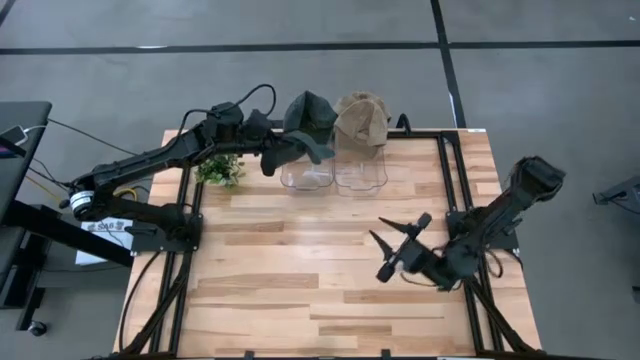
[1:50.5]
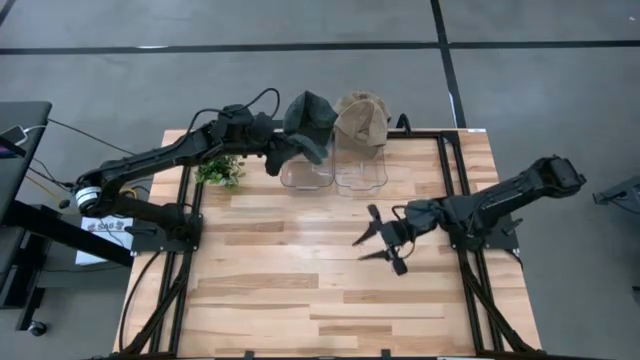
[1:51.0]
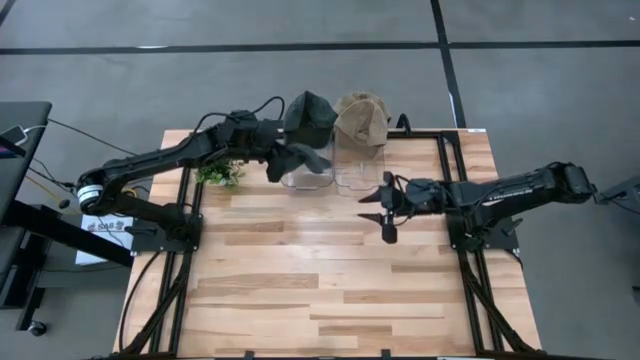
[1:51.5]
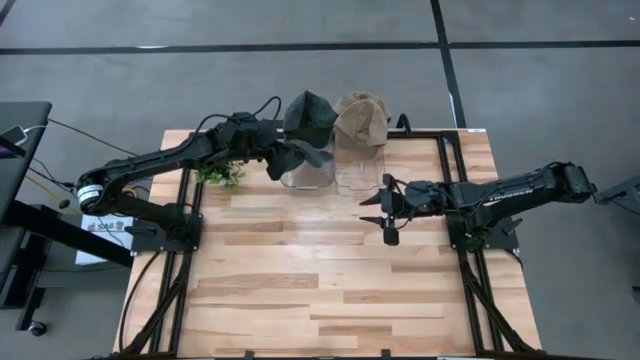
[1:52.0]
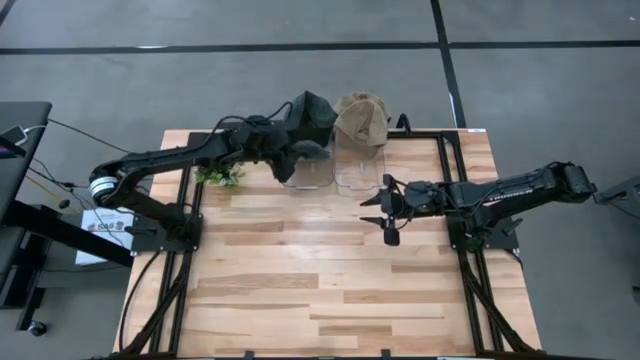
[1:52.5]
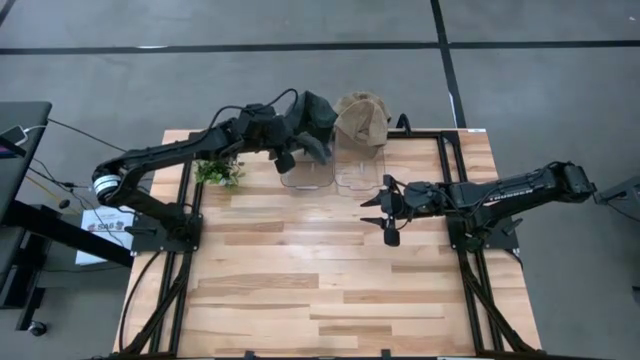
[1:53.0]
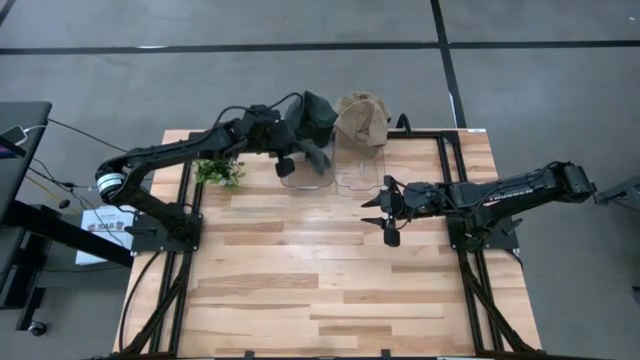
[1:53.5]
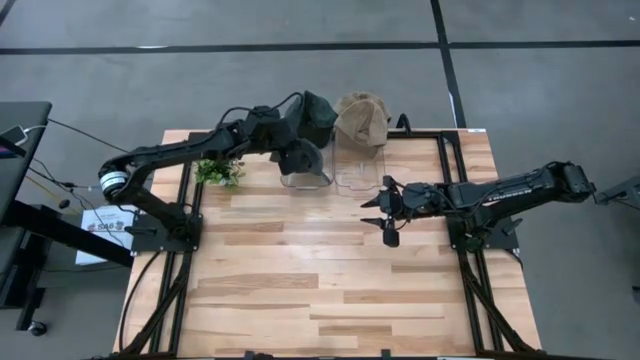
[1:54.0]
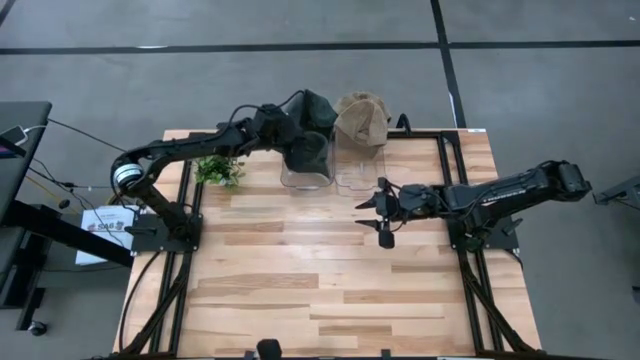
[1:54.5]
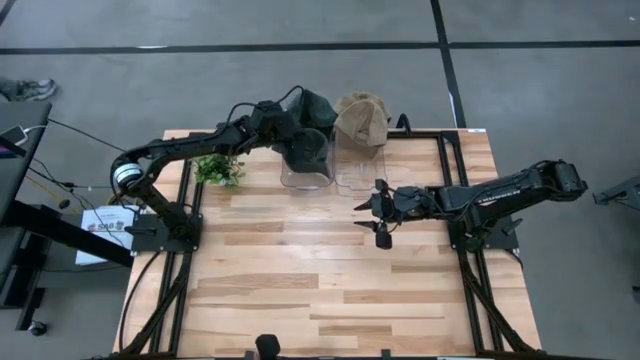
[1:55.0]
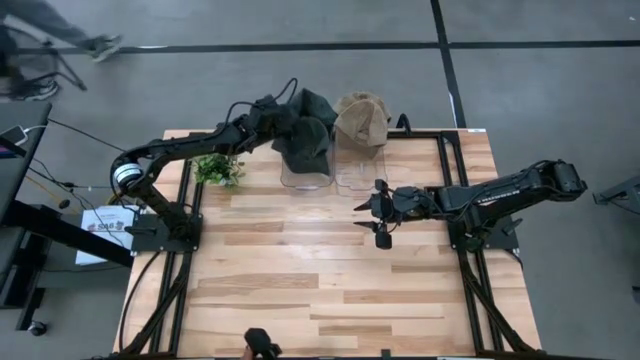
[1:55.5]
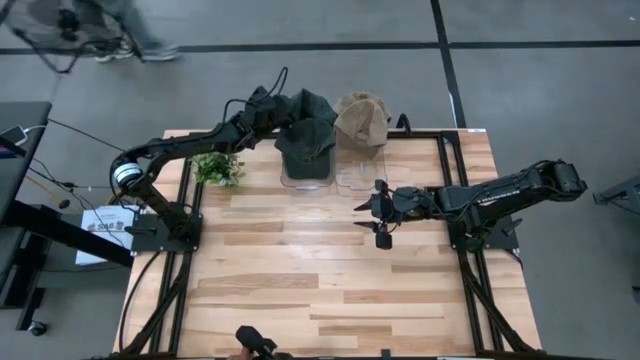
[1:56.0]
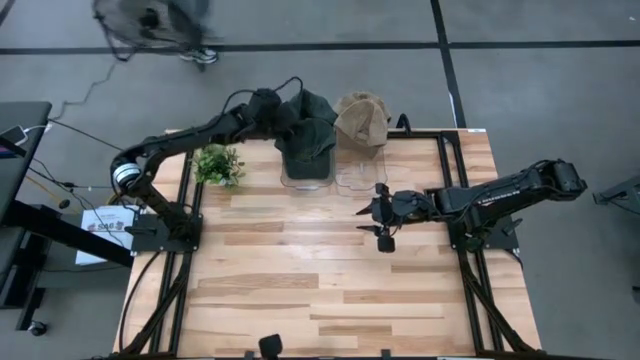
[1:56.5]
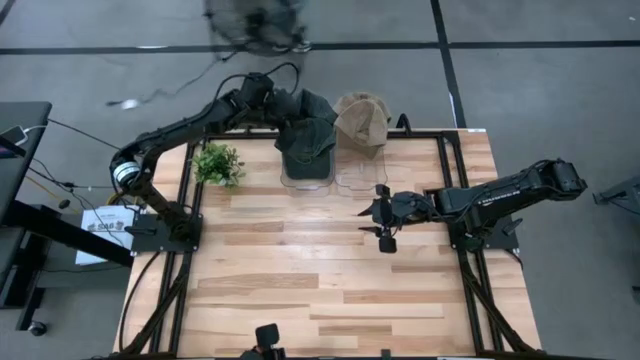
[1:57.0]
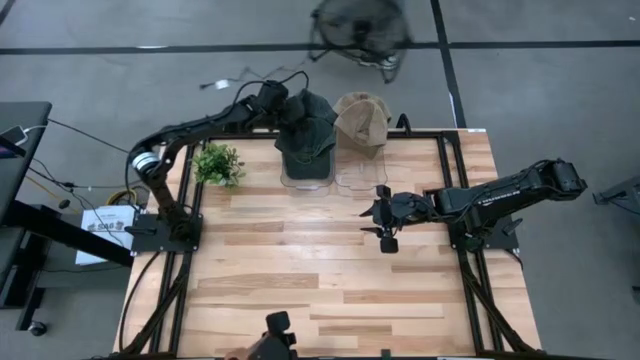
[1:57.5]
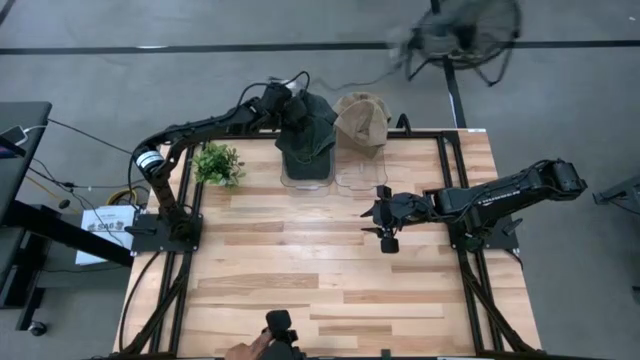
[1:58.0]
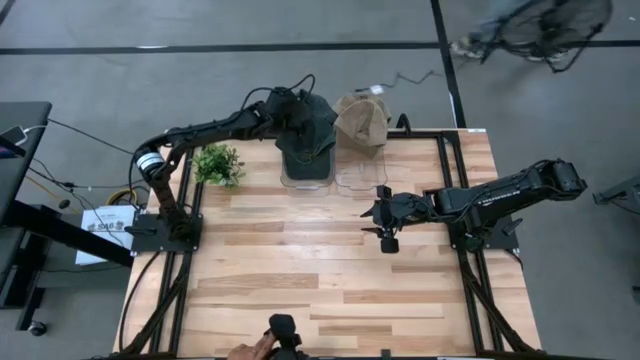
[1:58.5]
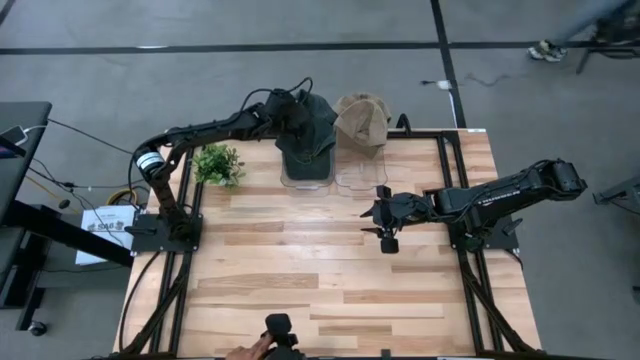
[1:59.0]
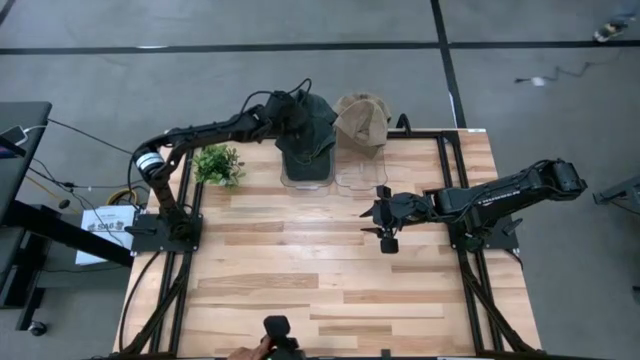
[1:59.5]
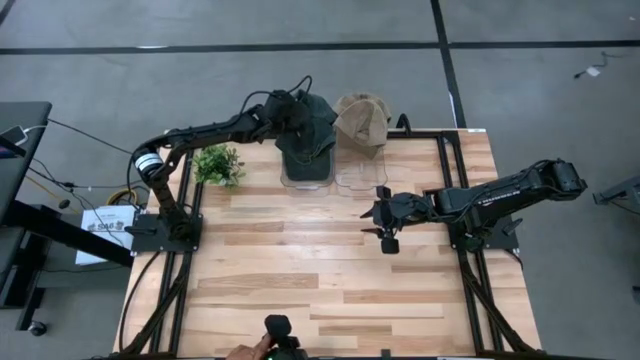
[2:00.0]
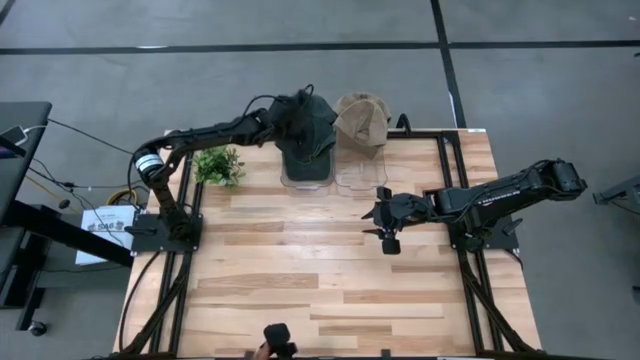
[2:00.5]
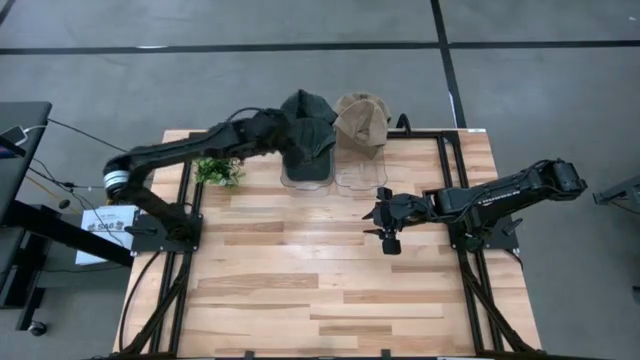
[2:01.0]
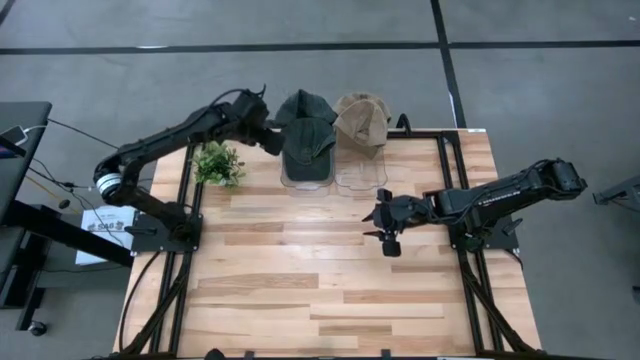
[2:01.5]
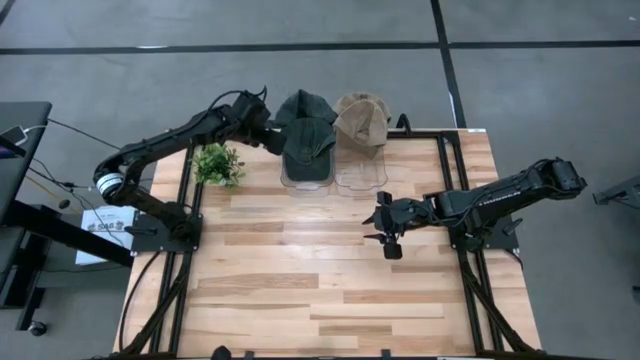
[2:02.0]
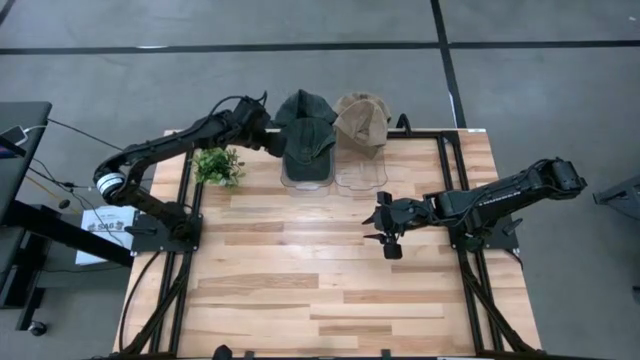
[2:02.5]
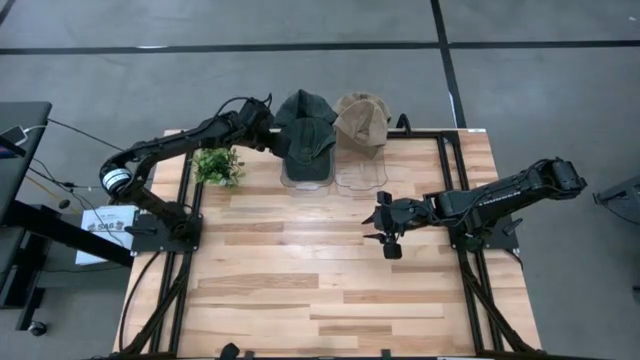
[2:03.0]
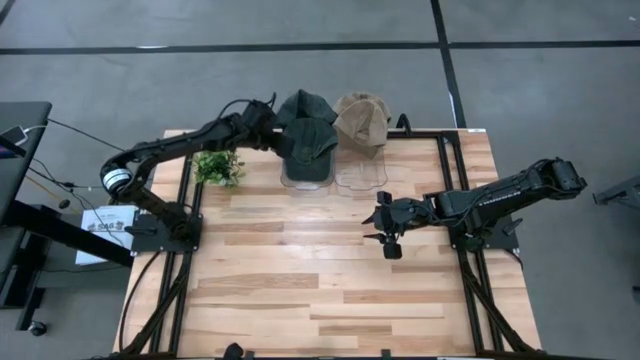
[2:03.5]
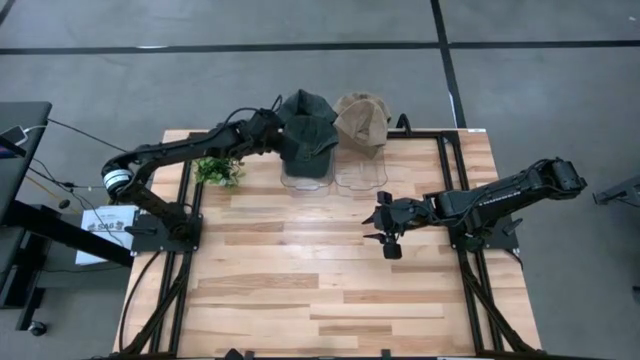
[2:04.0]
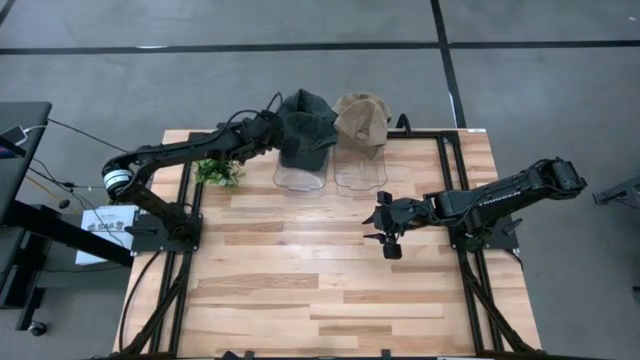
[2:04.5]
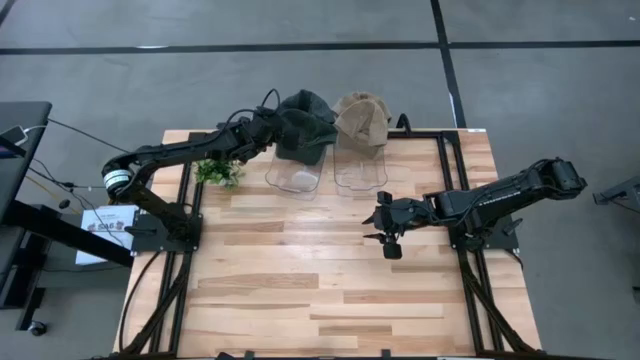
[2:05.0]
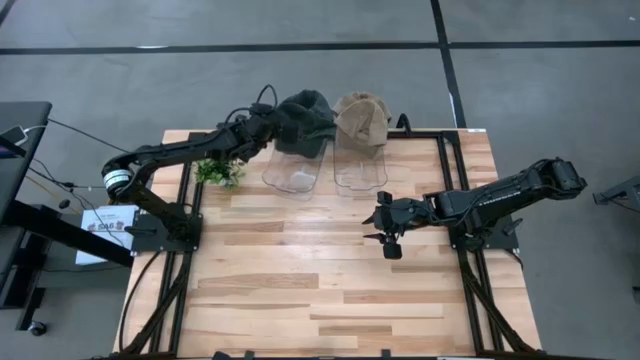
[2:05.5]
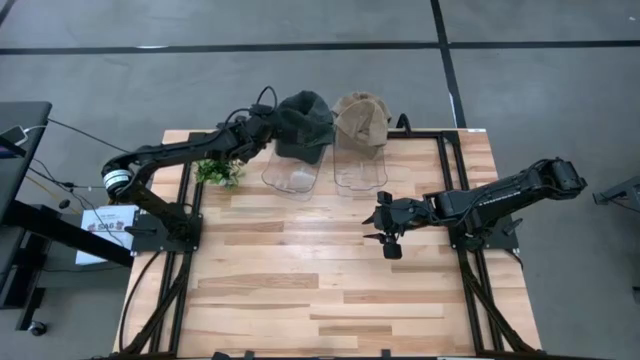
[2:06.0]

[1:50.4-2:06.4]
Task: Pick & Place hat
Put the black cap into the left transparent bin

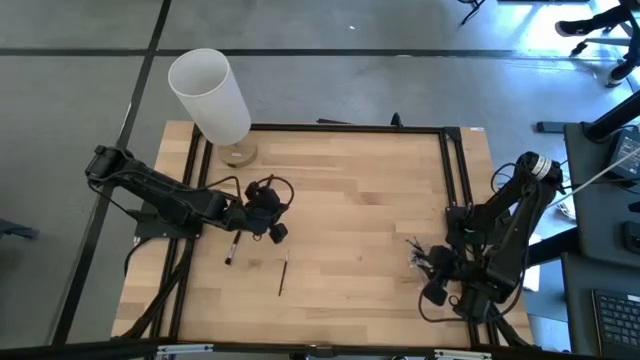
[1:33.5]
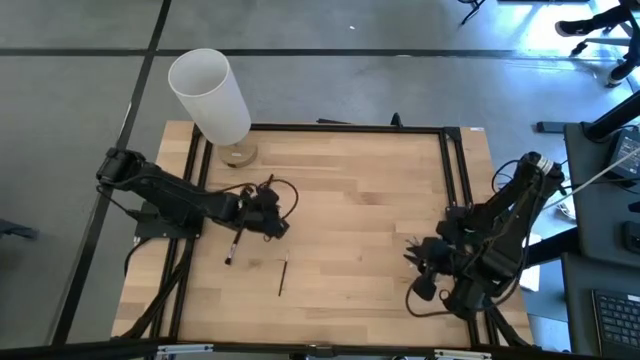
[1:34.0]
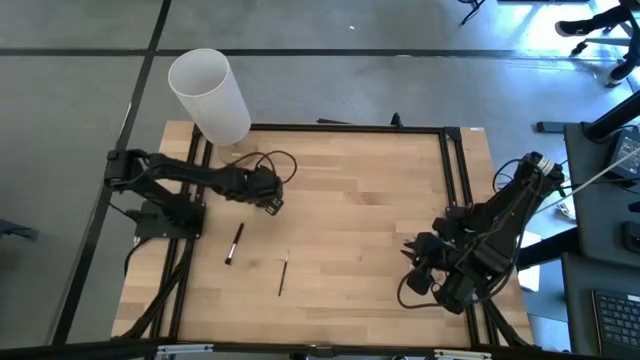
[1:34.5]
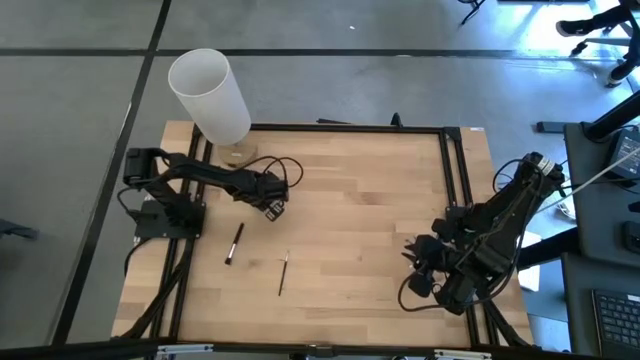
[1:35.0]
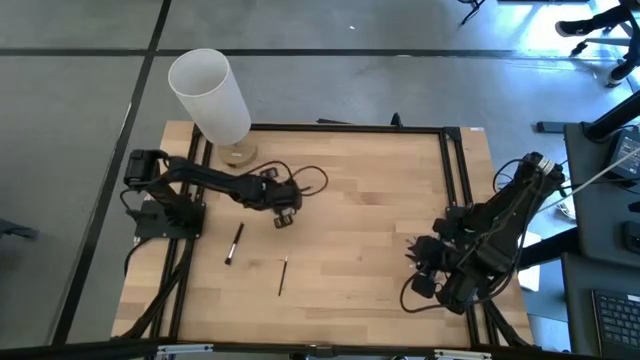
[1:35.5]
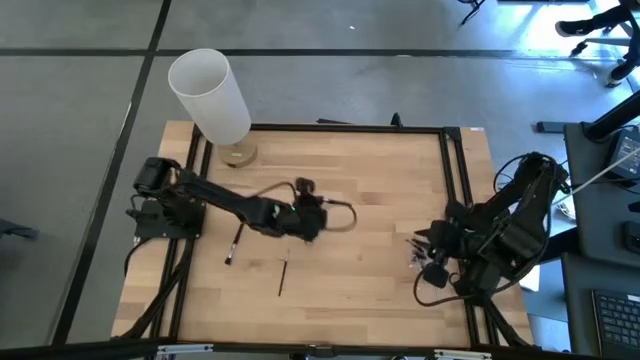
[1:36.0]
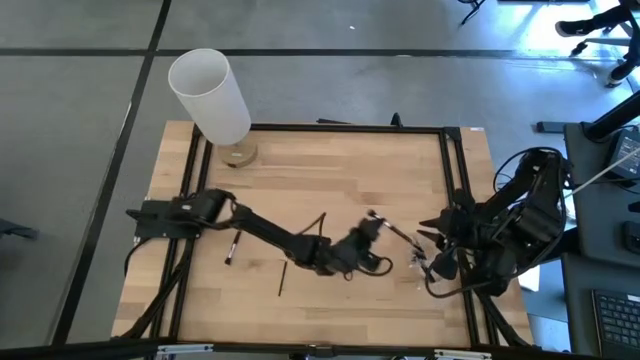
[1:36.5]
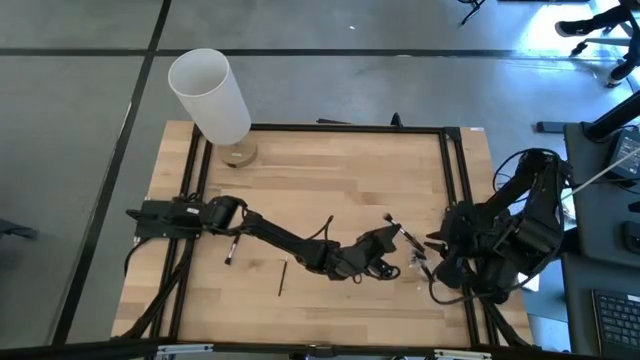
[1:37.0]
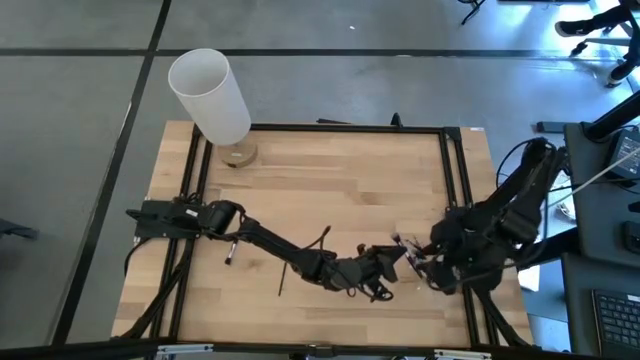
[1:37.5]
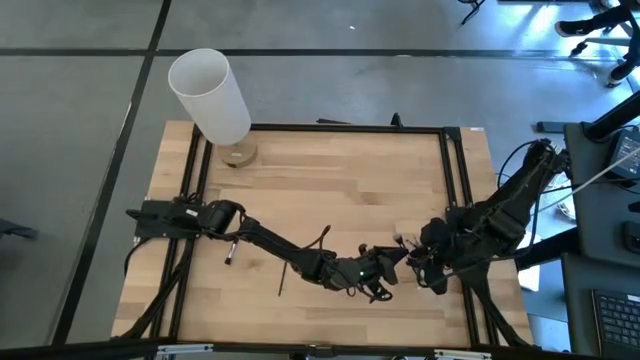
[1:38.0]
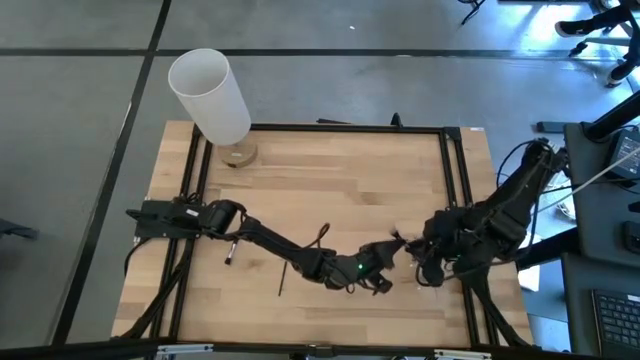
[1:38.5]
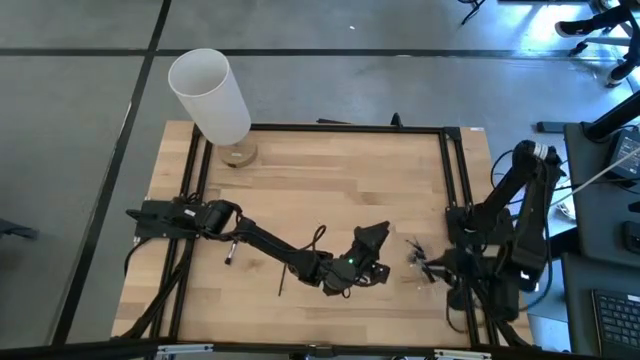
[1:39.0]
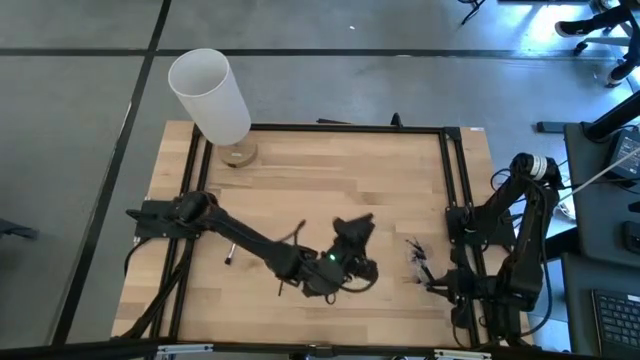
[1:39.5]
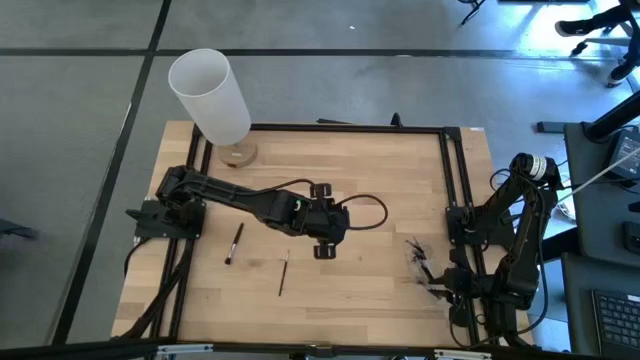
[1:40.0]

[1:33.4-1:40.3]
Task: Put items in baskets/containers
Put the black powder brush into the transparent organizer
